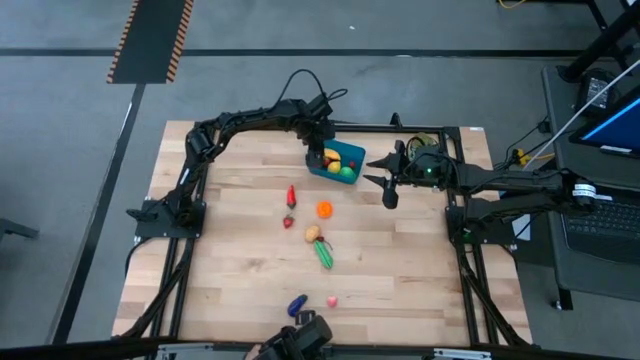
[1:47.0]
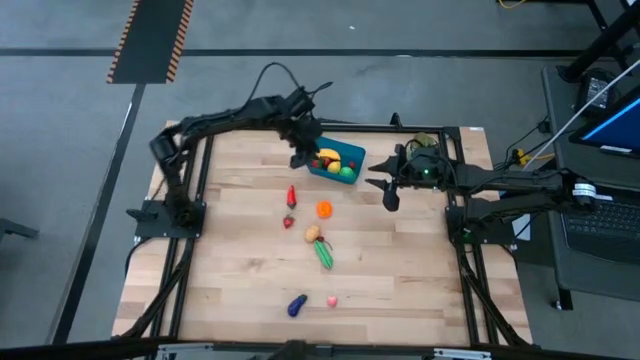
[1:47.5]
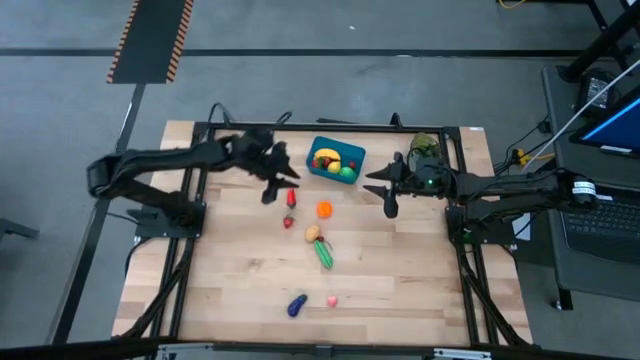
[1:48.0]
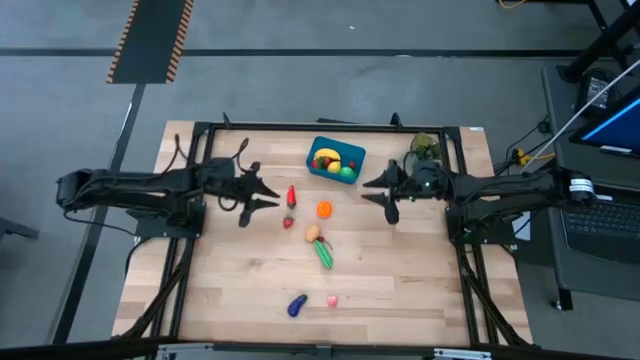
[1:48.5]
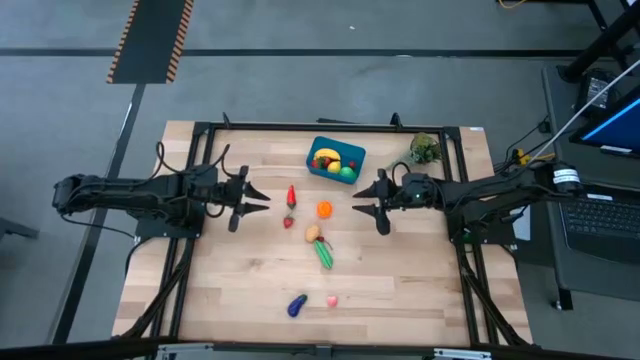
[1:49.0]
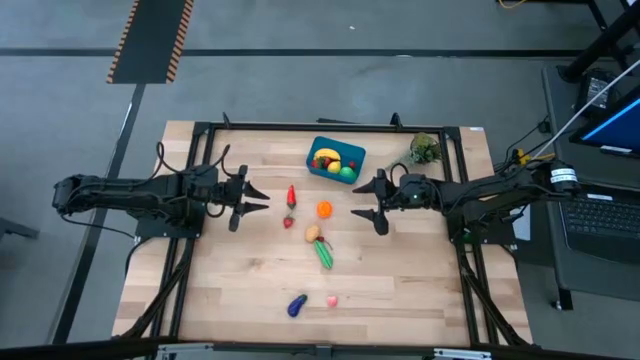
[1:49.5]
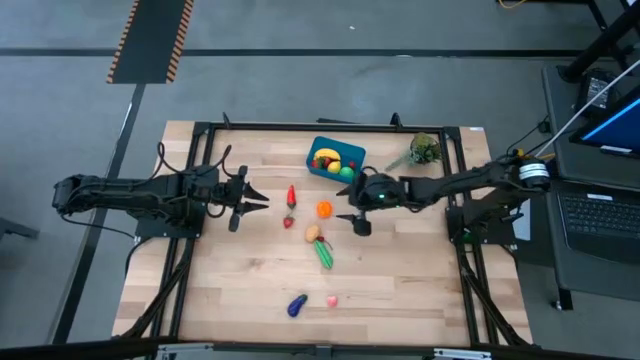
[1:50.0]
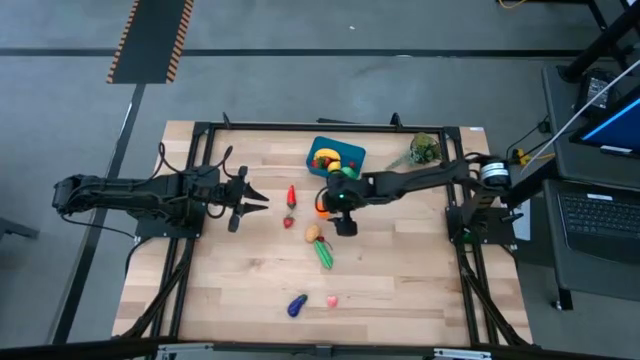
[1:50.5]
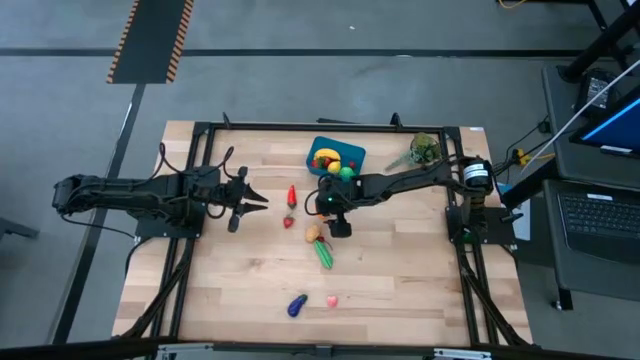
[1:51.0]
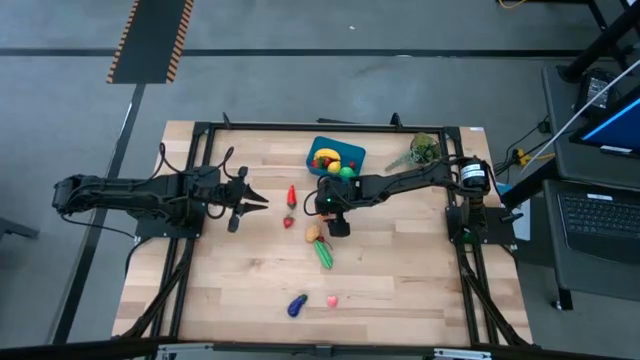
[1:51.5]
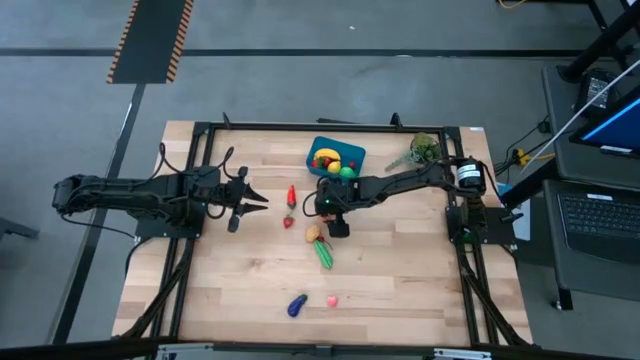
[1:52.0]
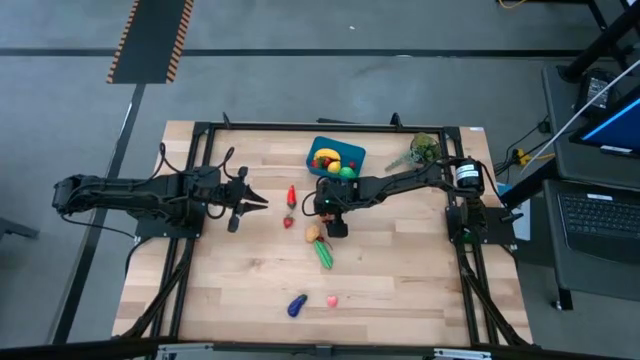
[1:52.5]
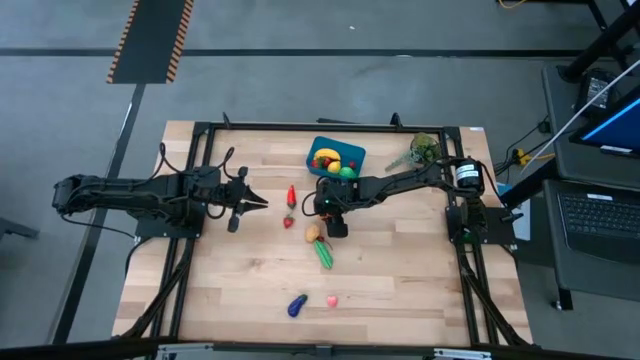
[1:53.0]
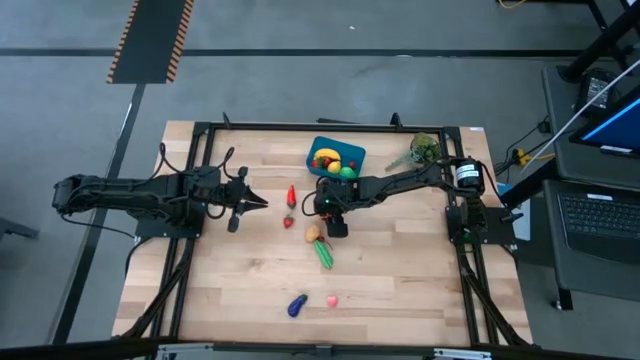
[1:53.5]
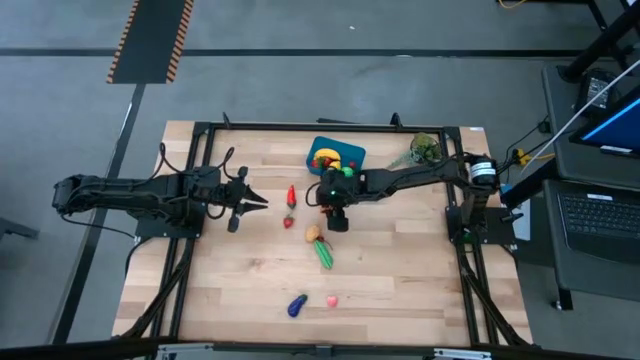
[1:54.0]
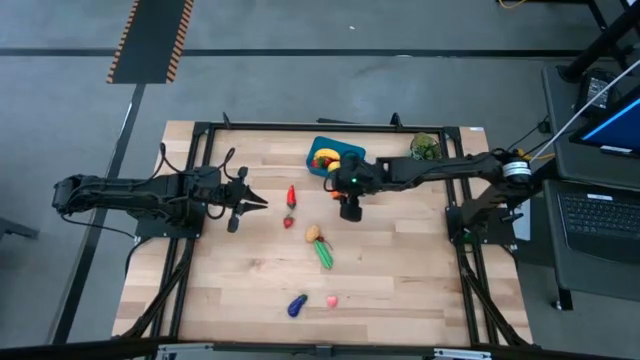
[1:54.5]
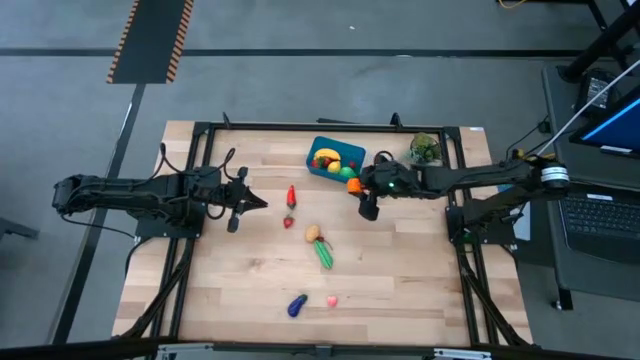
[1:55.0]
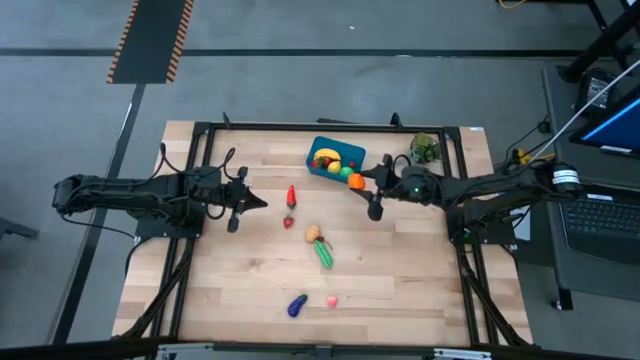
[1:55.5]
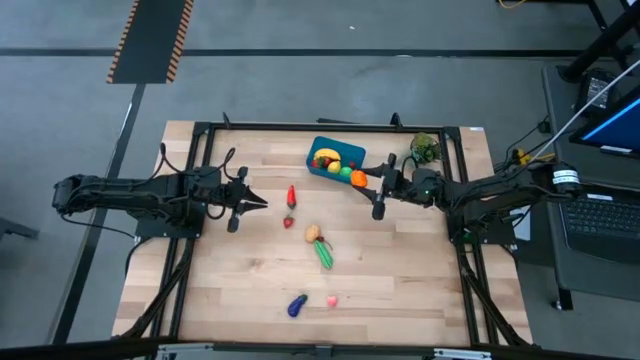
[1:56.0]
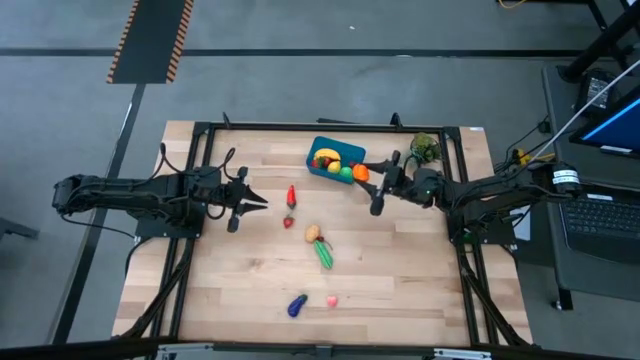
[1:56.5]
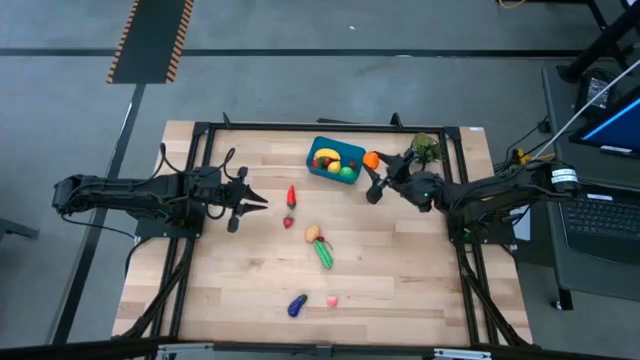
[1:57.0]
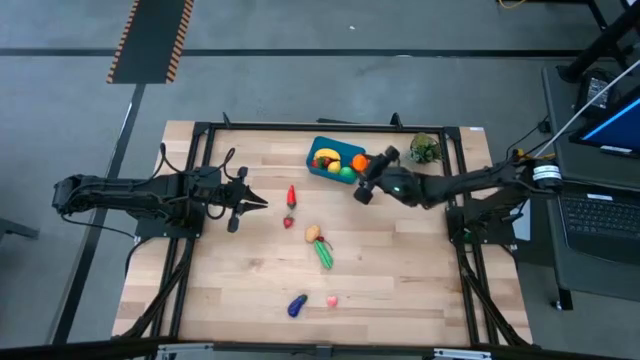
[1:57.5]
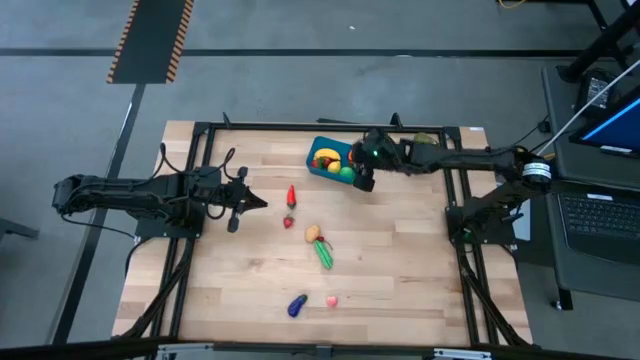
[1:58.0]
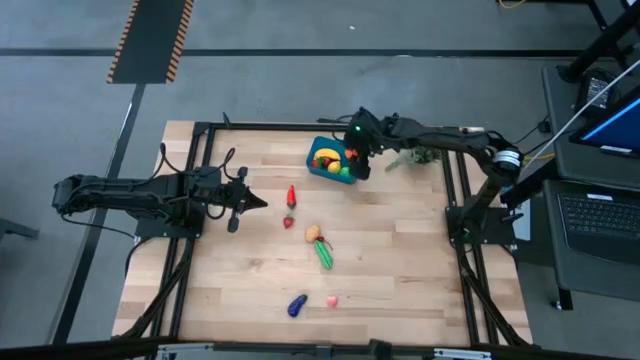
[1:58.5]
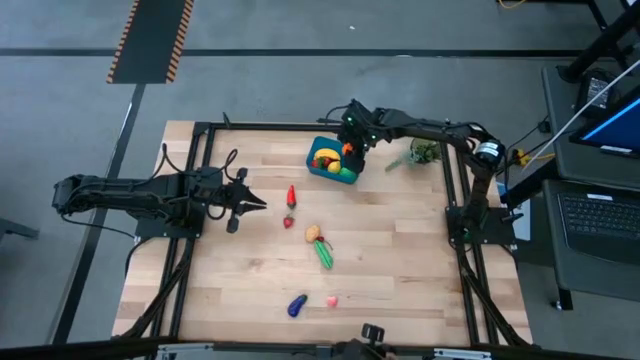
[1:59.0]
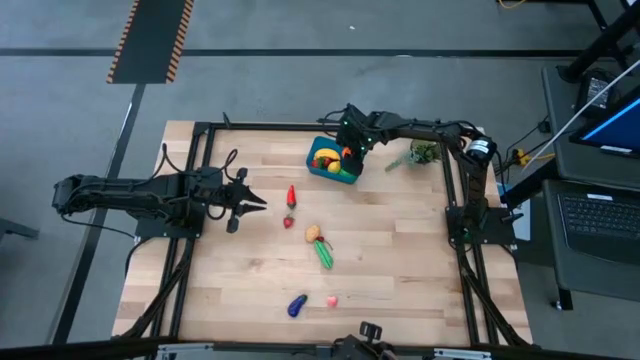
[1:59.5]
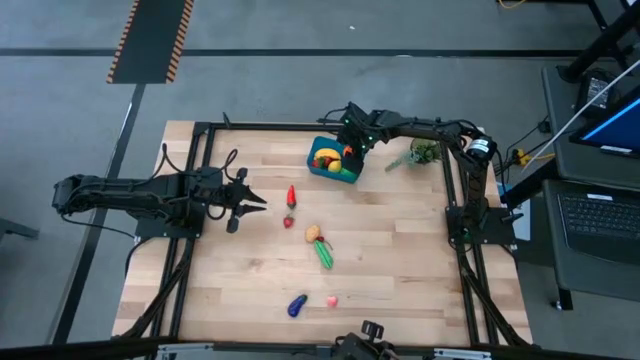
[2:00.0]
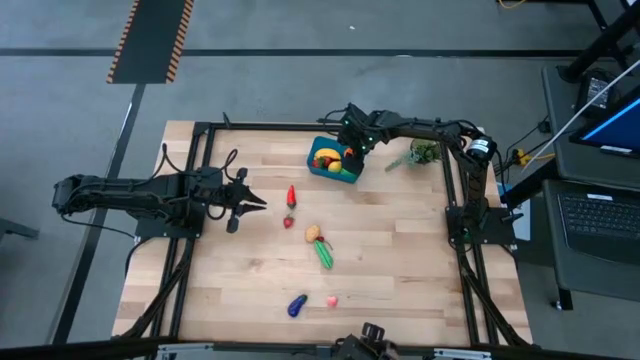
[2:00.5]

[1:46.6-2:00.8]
Task: Pick and placing Produce into tupperware
Put the tangerine into the blue bin
